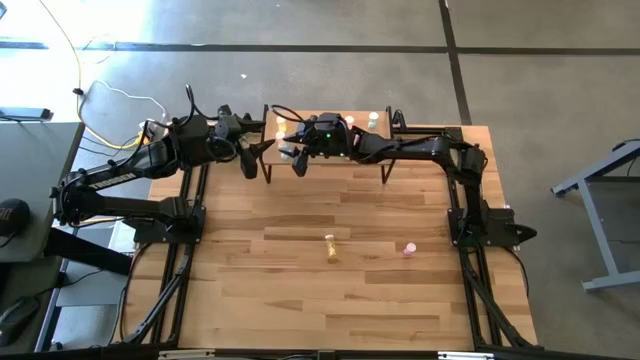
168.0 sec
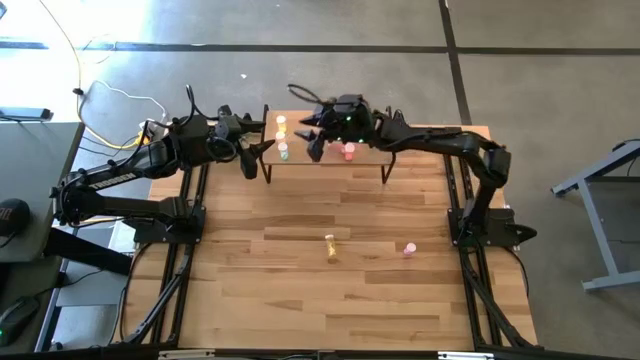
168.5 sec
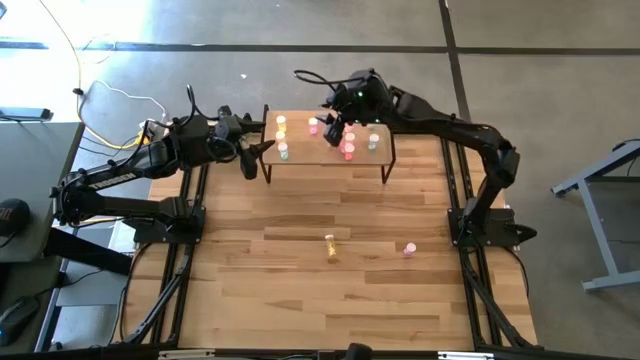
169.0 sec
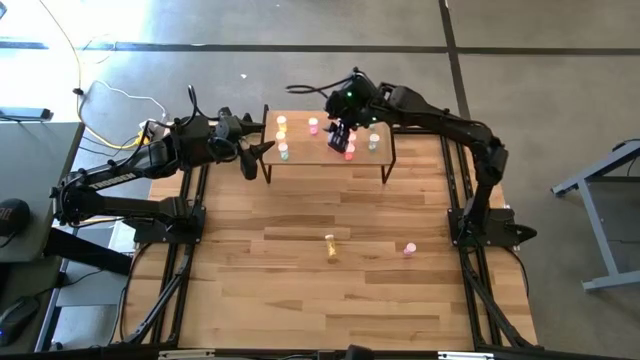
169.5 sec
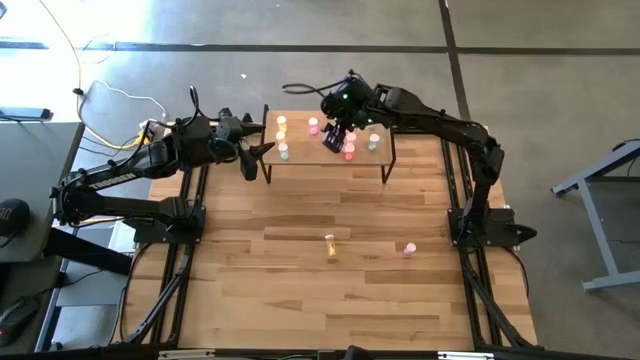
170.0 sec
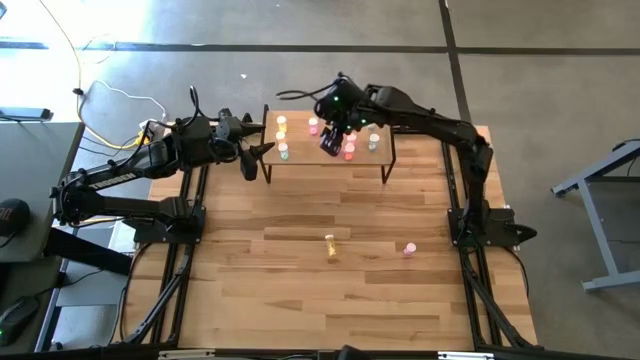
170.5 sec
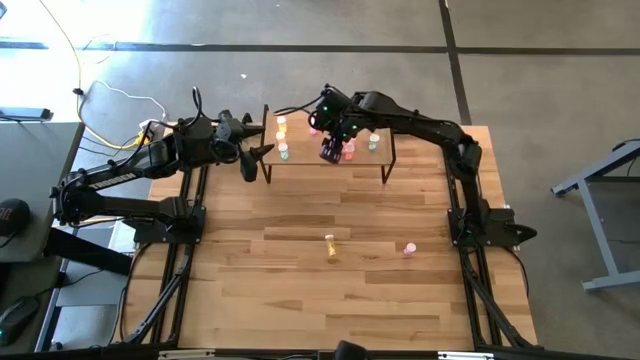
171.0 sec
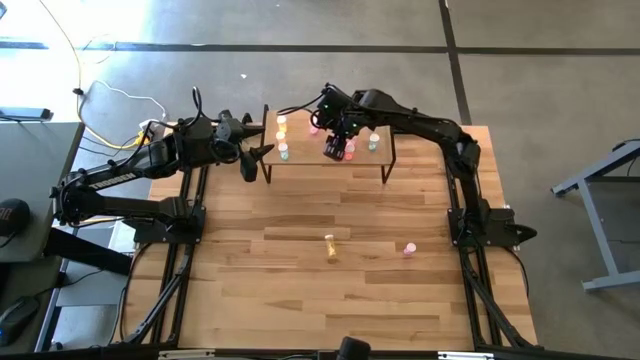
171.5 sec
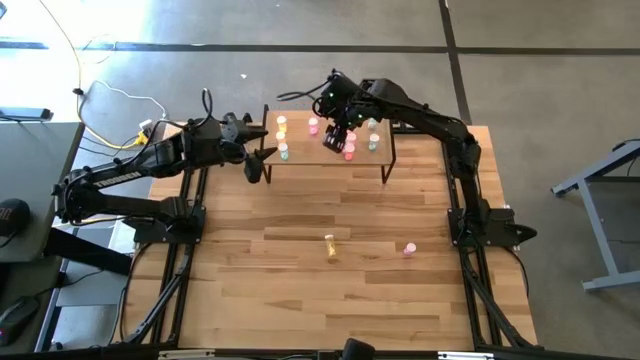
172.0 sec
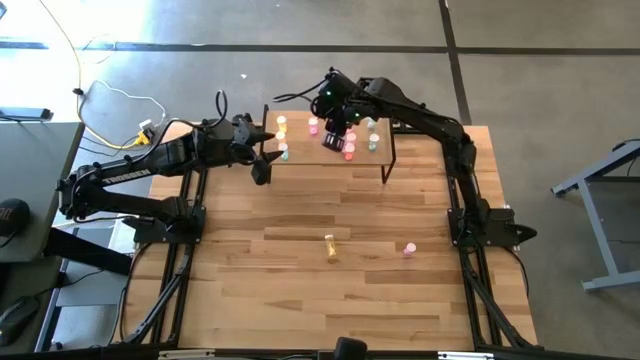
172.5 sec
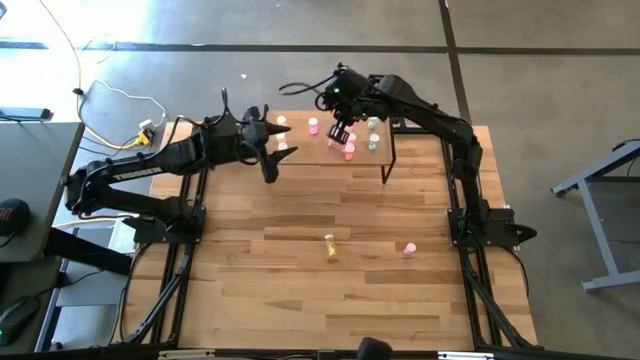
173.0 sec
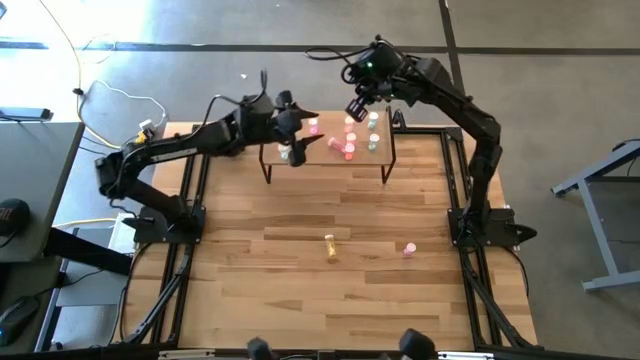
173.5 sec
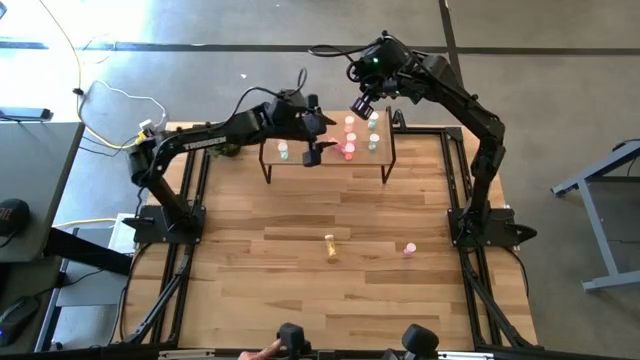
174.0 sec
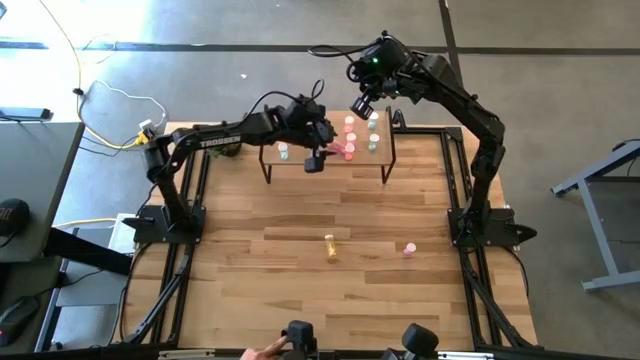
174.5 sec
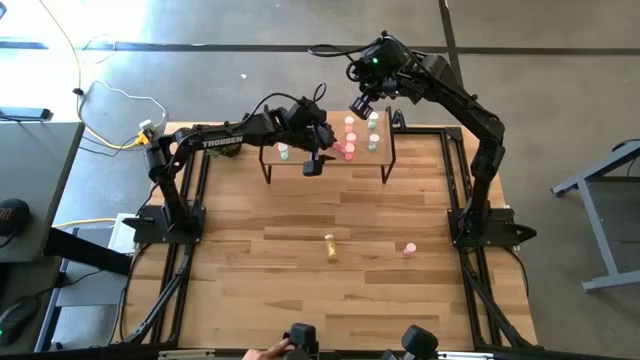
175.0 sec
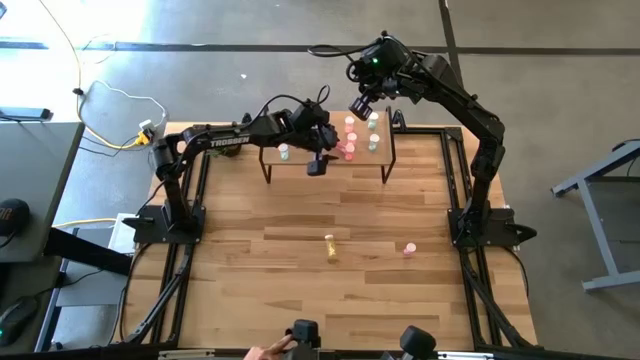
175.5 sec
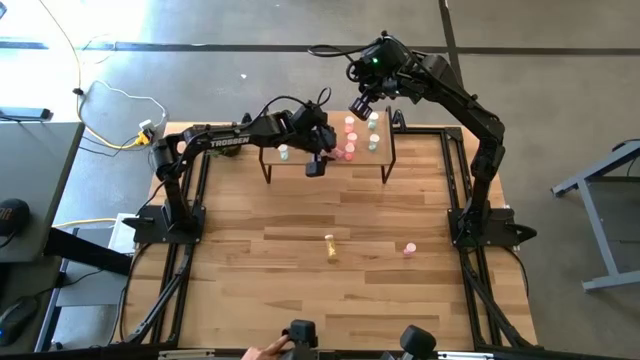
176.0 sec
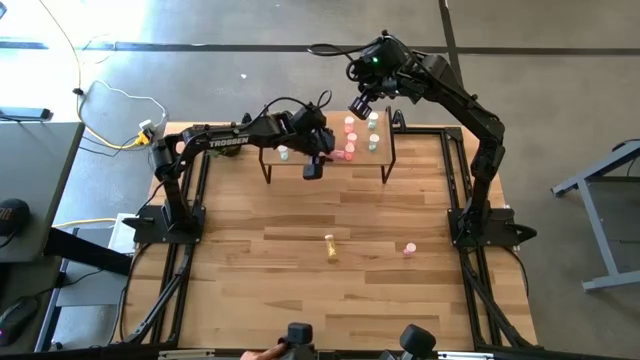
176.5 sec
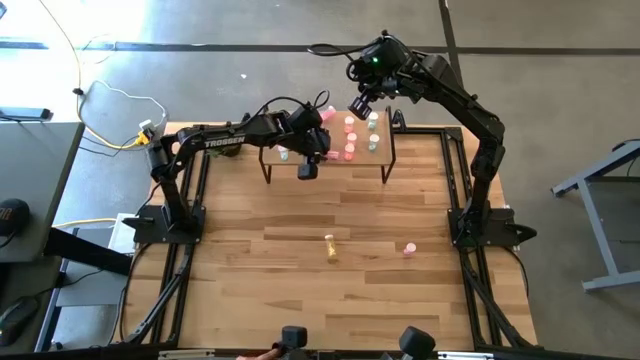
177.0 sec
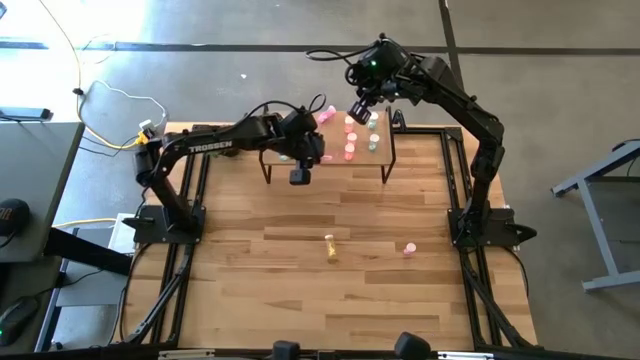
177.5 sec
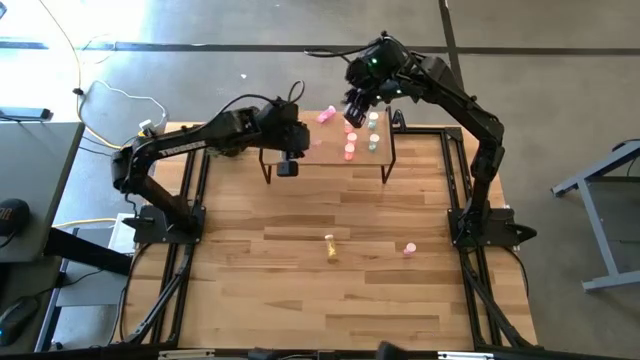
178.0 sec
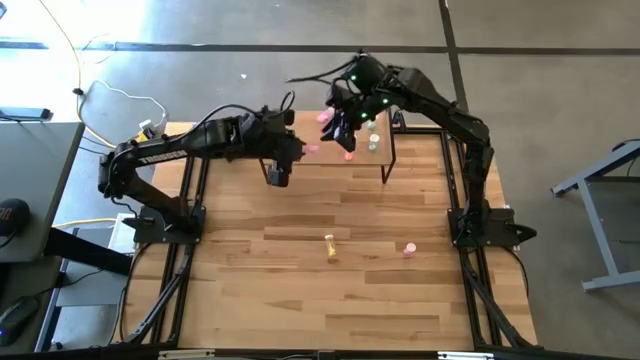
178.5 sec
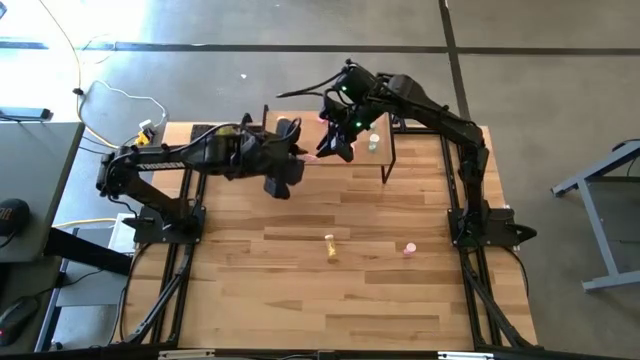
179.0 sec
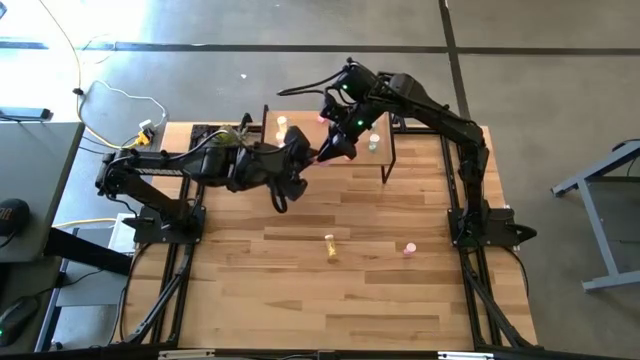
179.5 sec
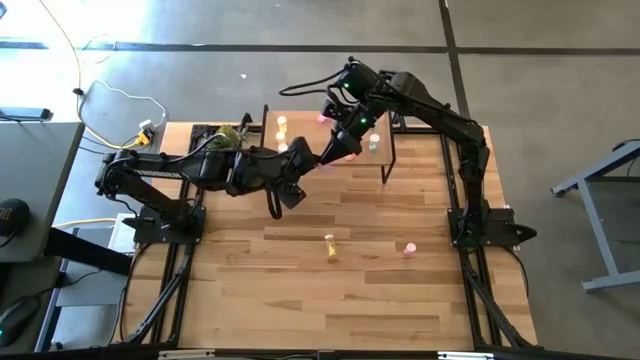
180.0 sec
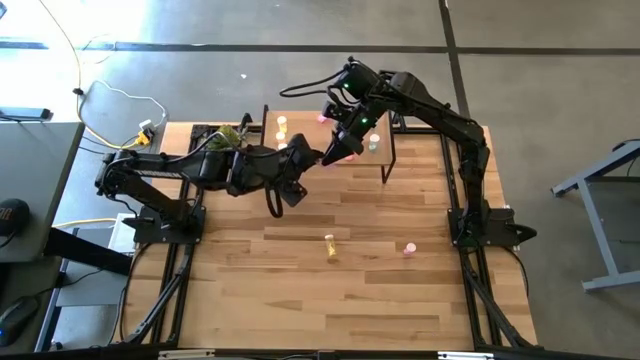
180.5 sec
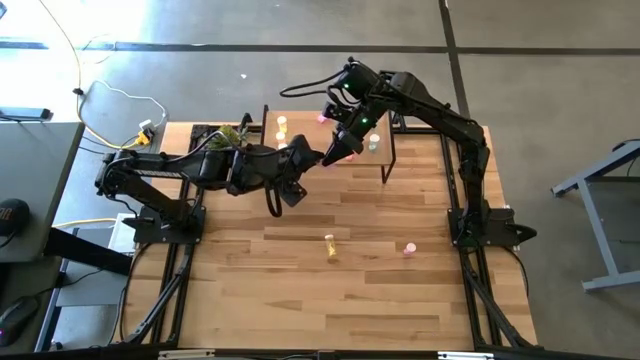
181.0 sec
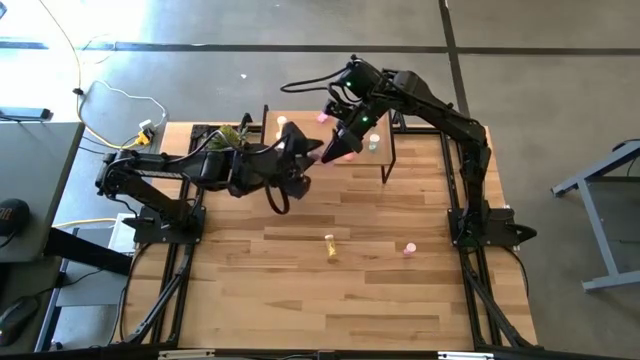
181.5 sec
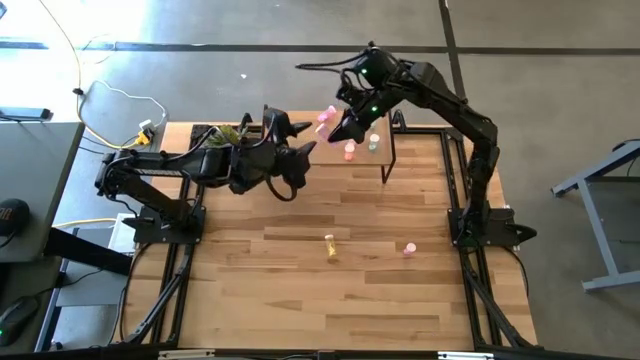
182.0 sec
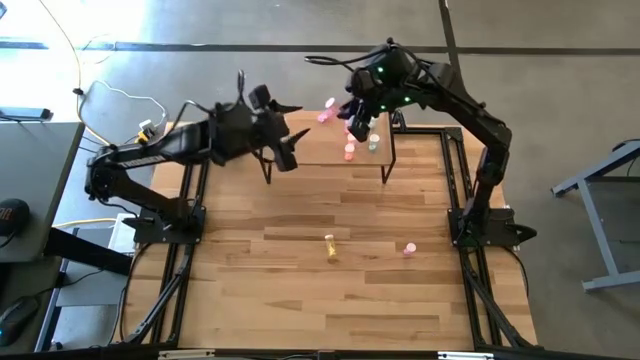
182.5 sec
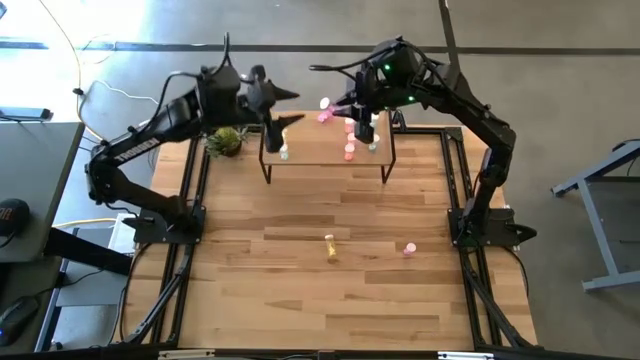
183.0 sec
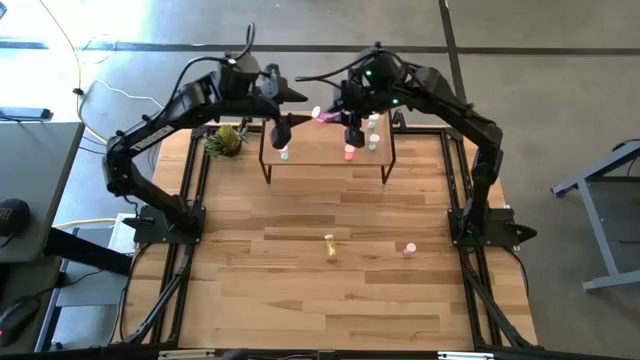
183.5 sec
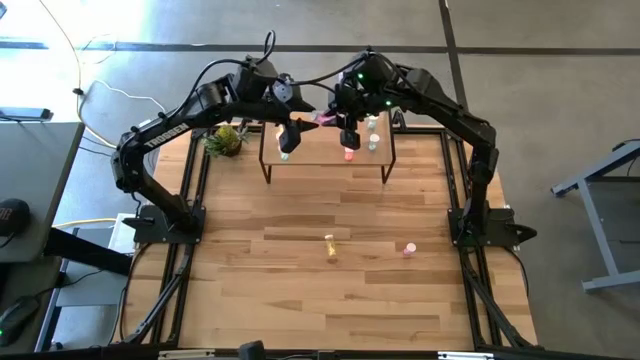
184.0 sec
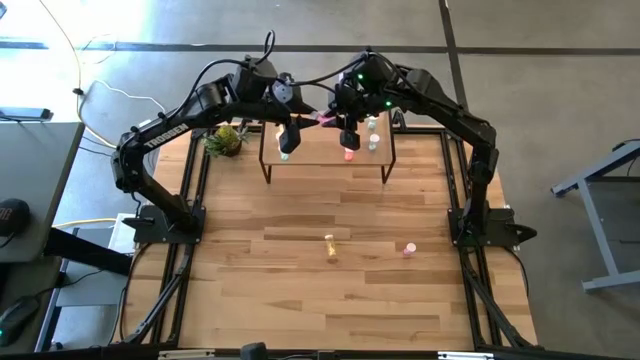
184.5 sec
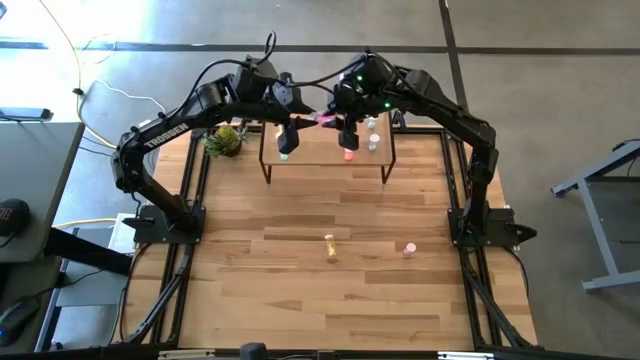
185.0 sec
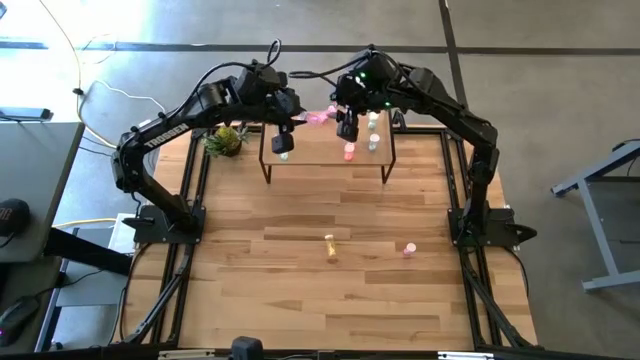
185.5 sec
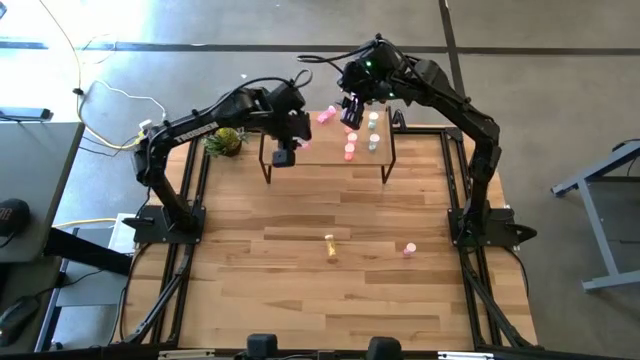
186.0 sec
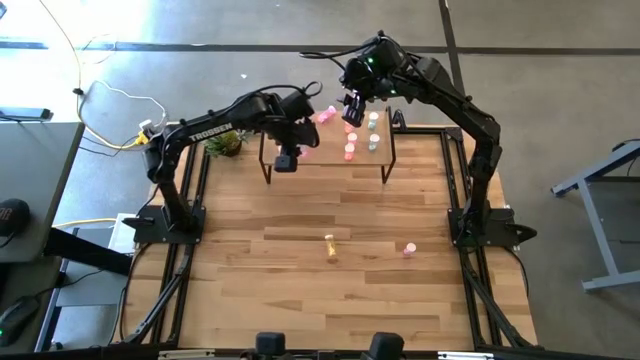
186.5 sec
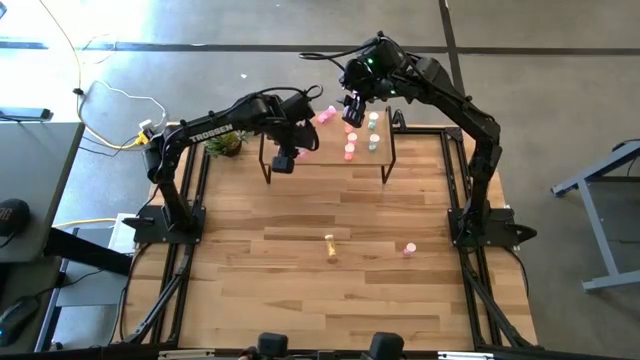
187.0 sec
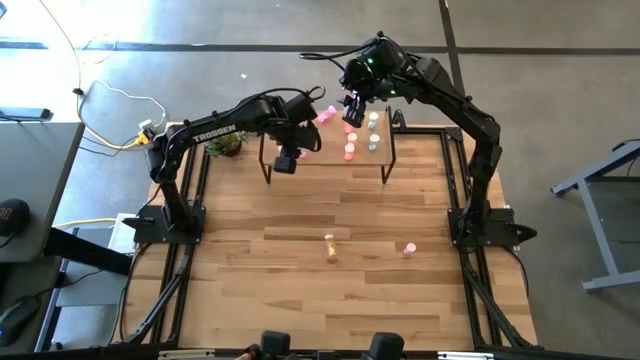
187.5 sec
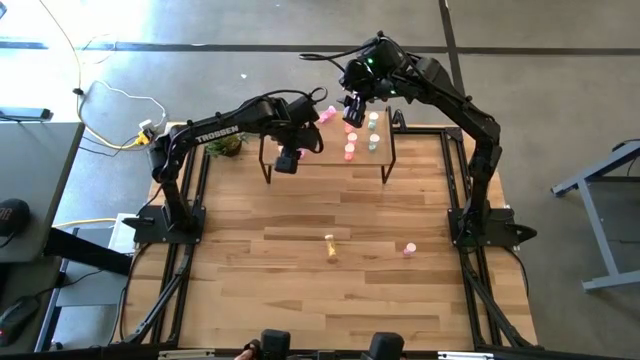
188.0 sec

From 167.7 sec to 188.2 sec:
Task: Pick and place medicine bottles onto shelf by color
Adjust the pink pill bottles on the shelf

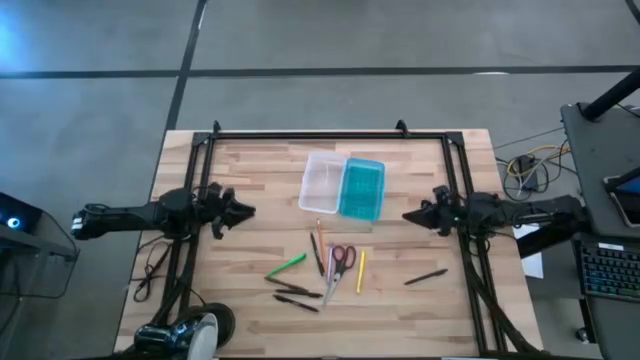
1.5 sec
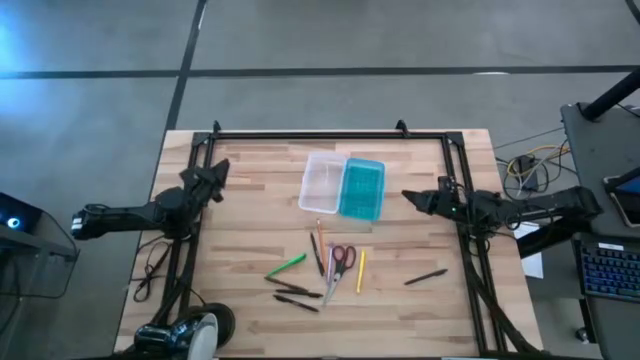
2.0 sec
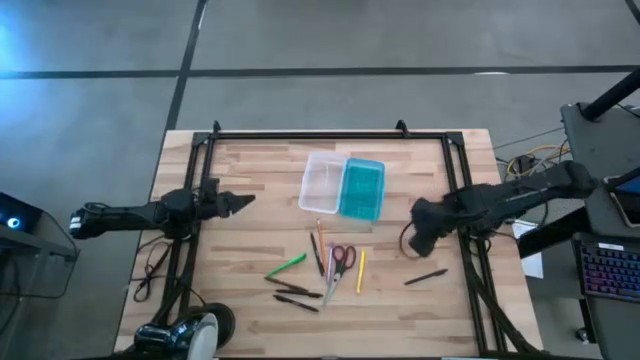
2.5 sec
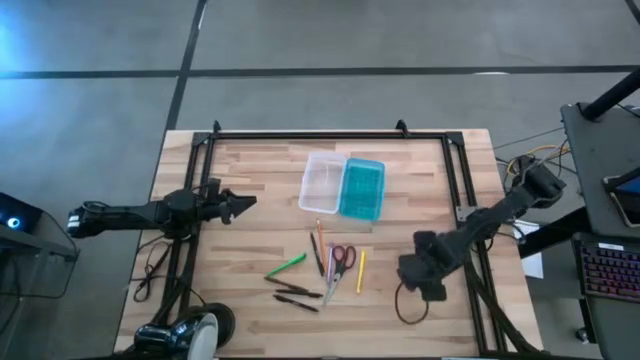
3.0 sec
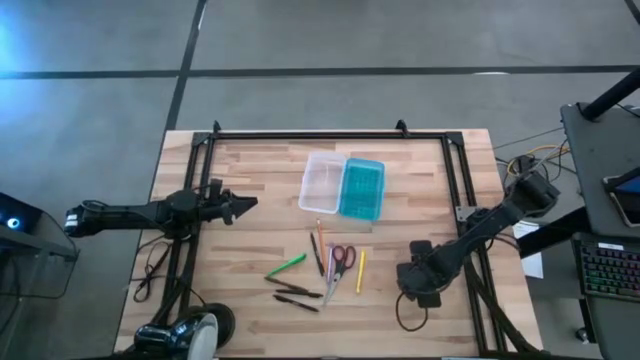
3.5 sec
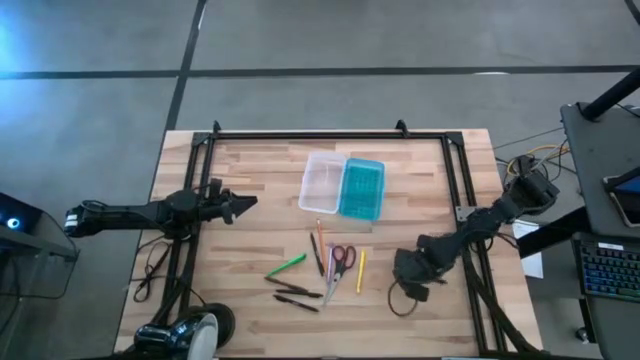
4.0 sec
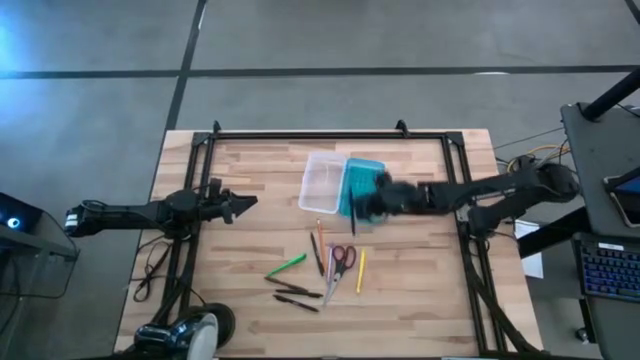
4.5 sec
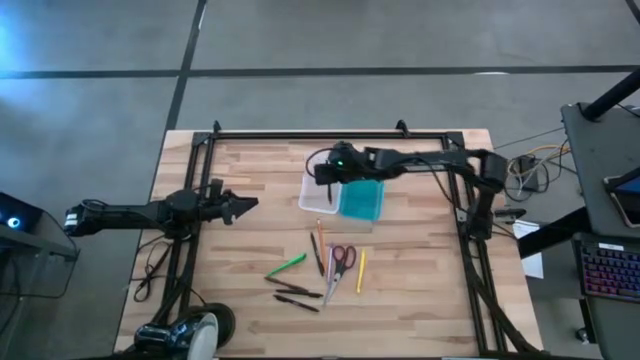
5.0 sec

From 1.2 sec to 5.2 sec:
Task: Pick & place school supplies into a supply box
Put the black pen into the supply box
